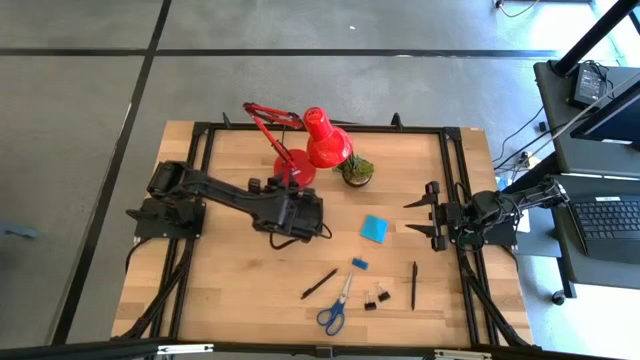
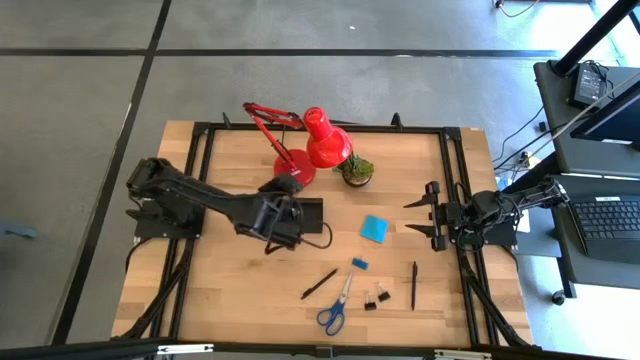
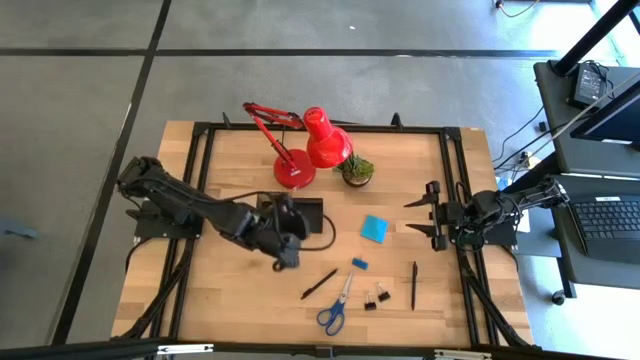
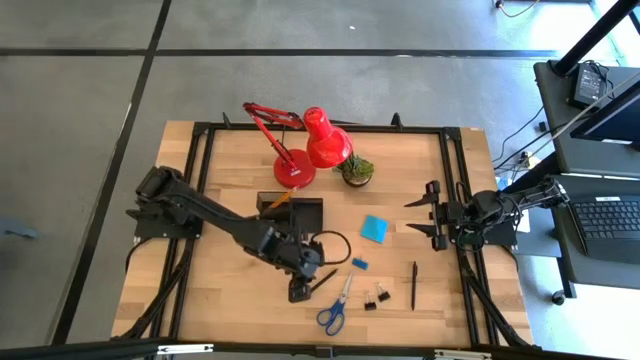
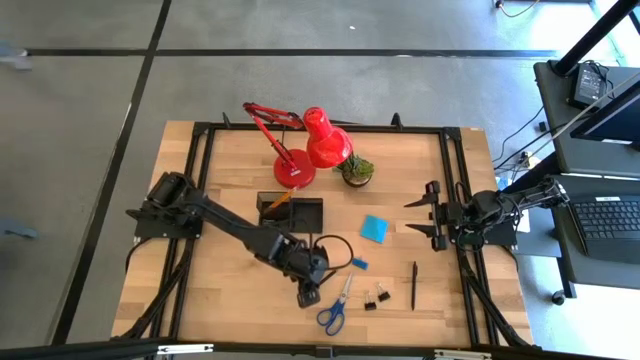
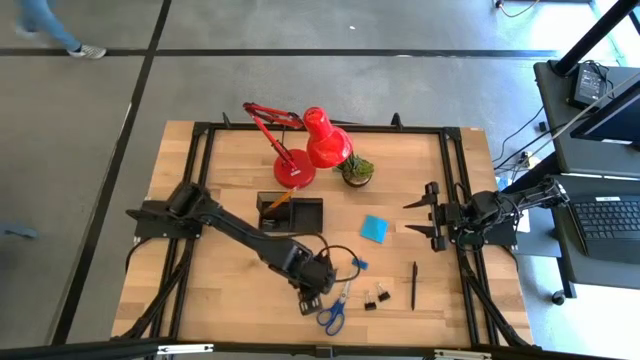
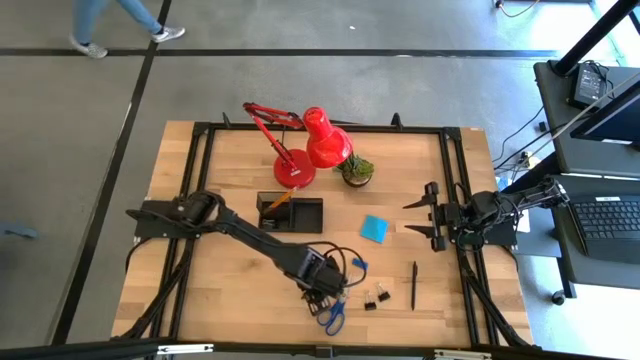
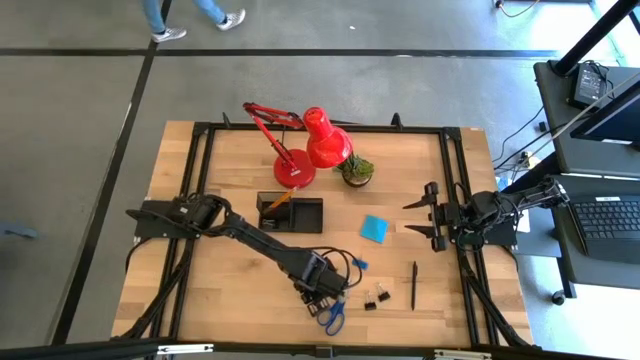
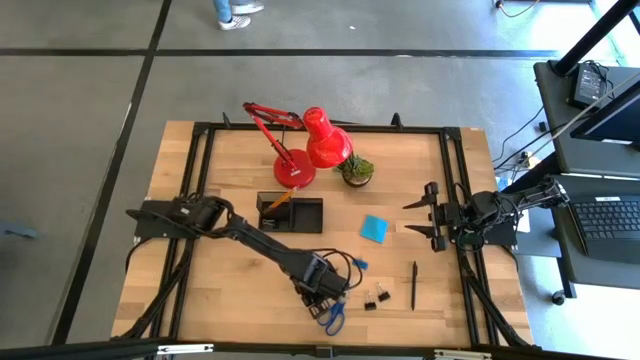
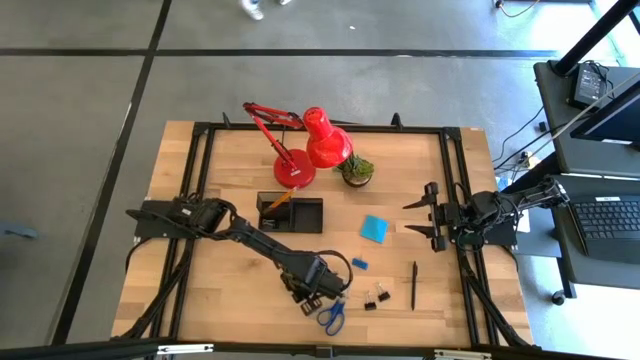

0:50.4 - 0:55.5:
Task: Pick and place office supplies into organizer
Put the left black pen into the black desk organizer

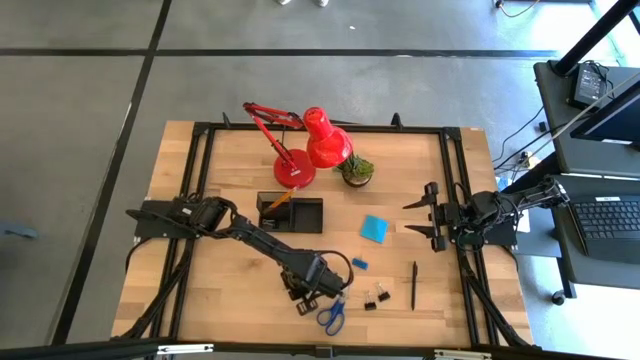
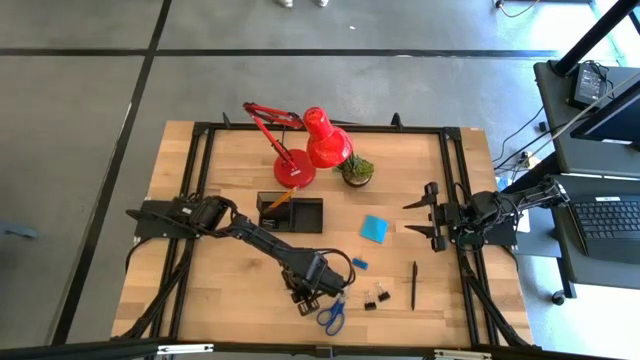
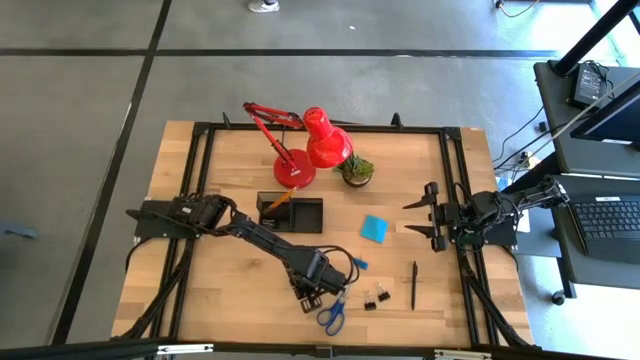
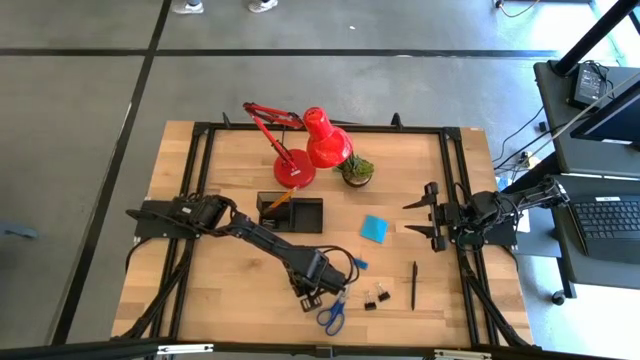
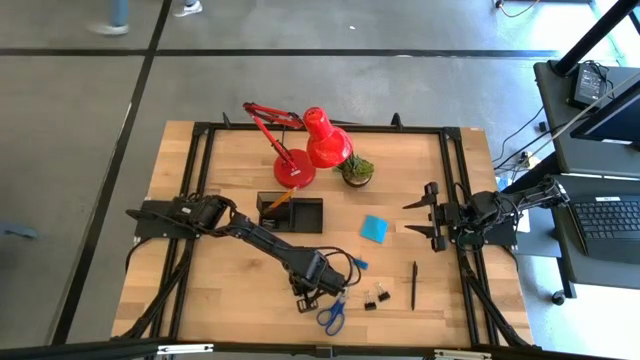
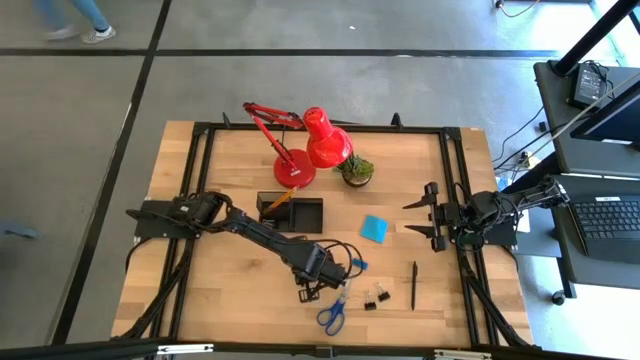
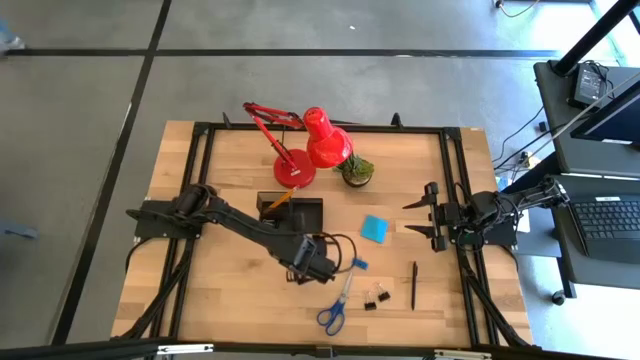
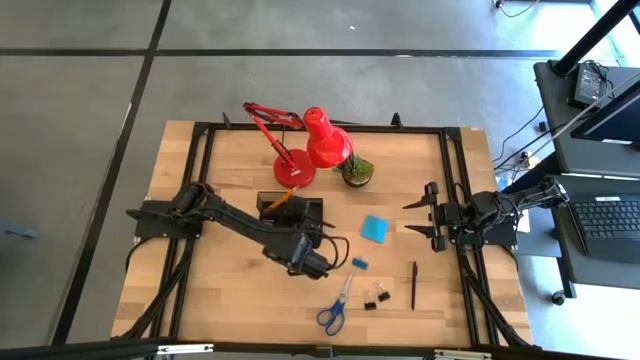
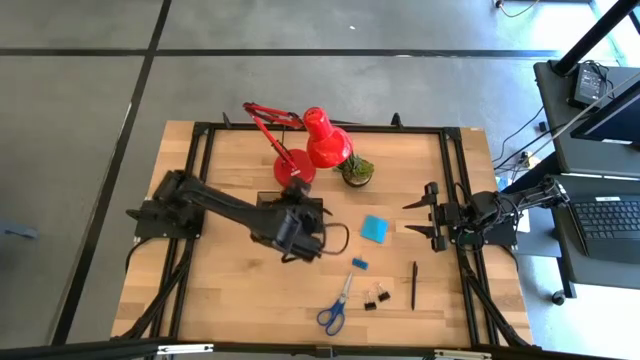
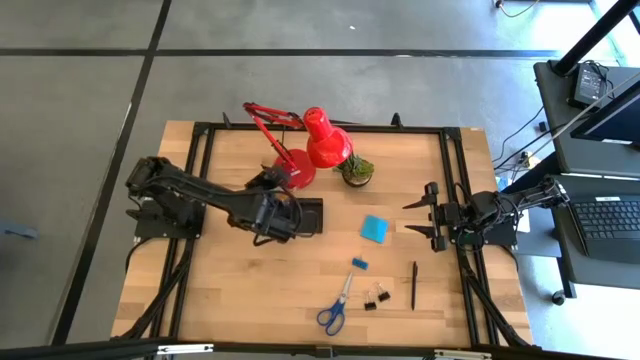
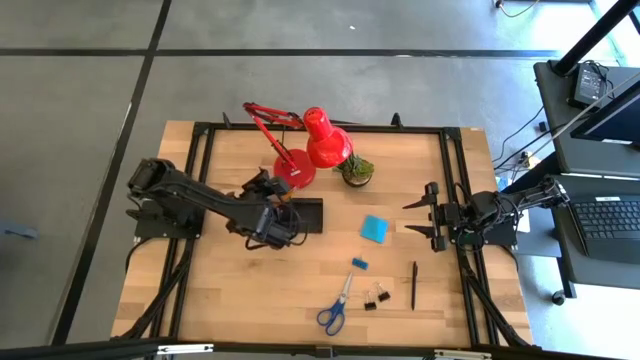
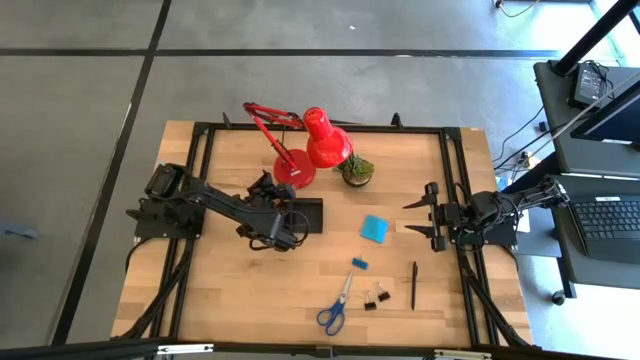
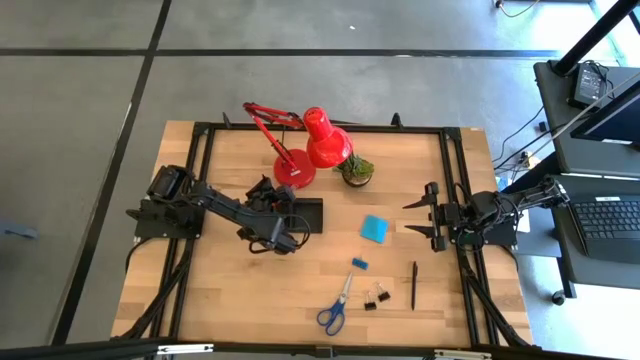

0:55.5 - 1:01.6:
Put the left black pen into the black desk organizer

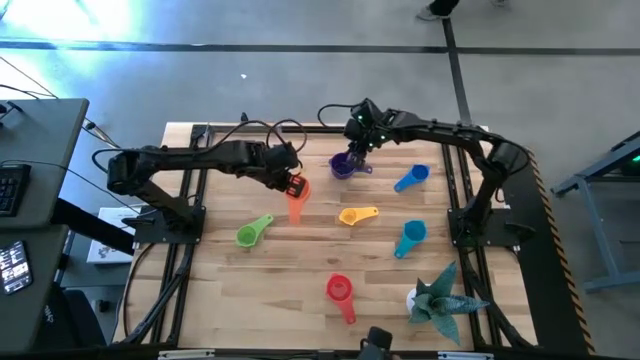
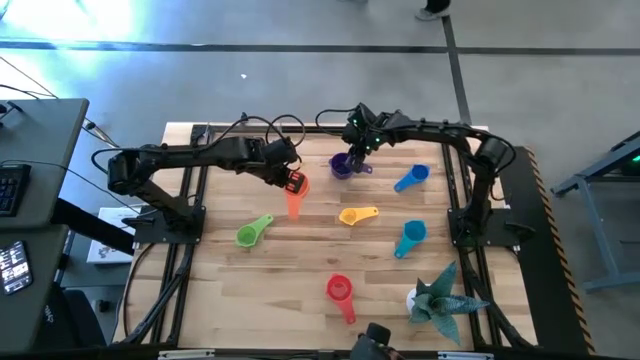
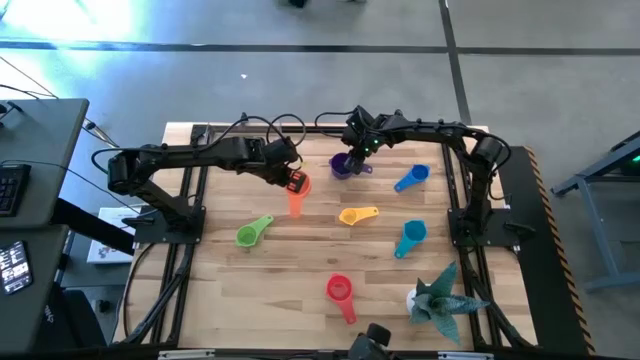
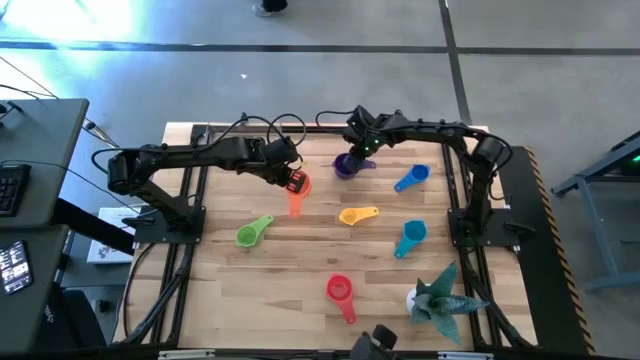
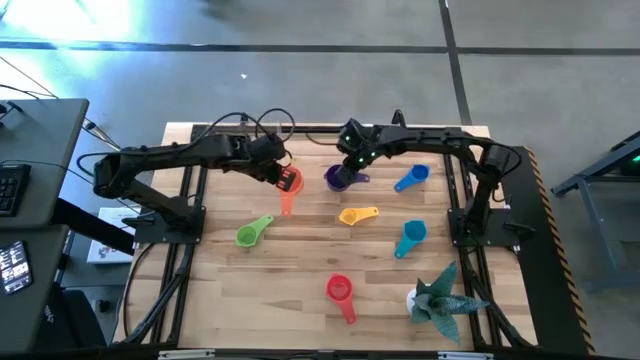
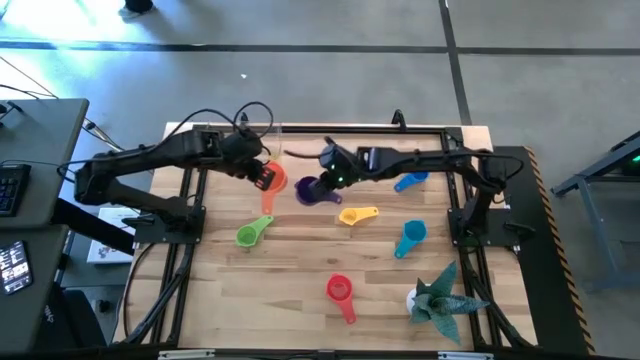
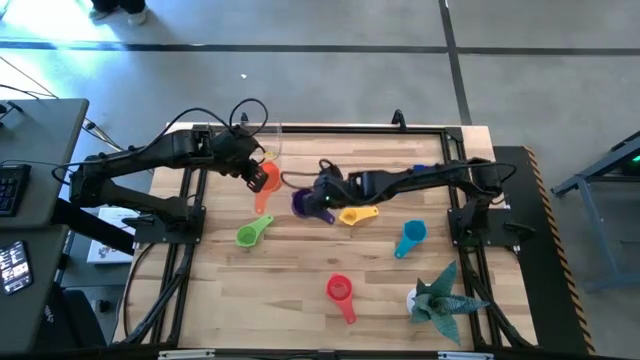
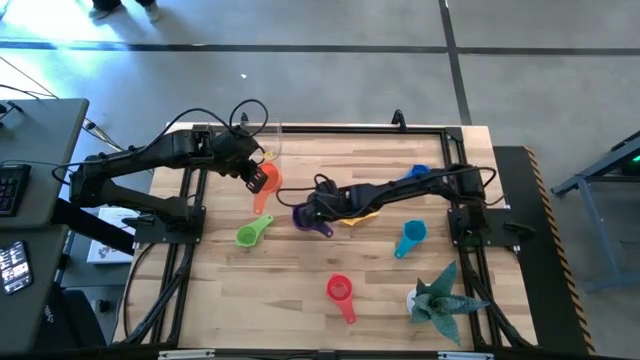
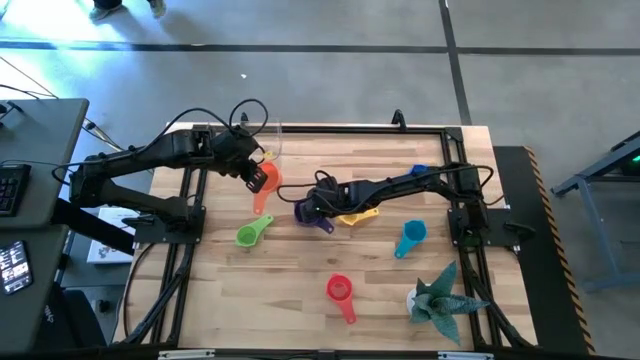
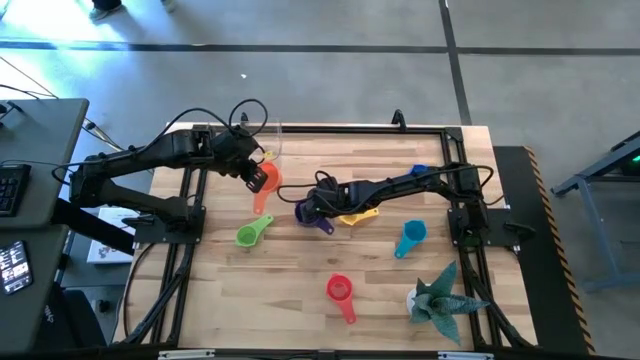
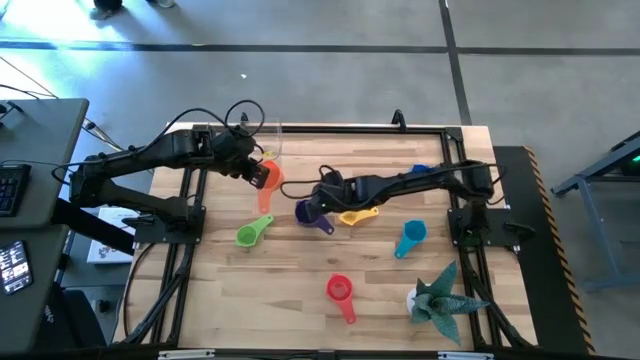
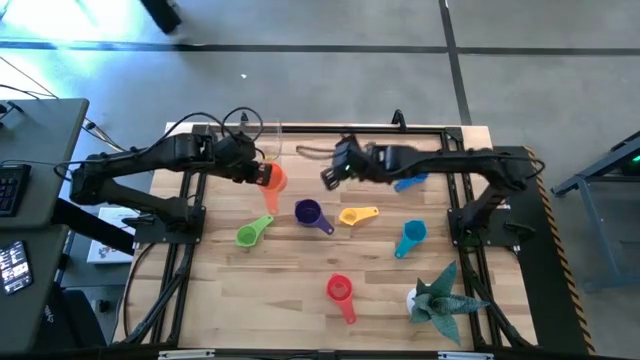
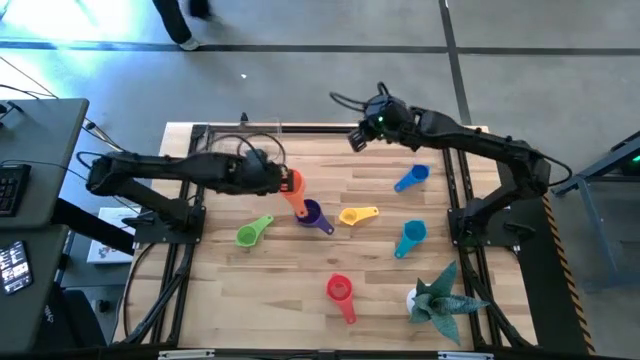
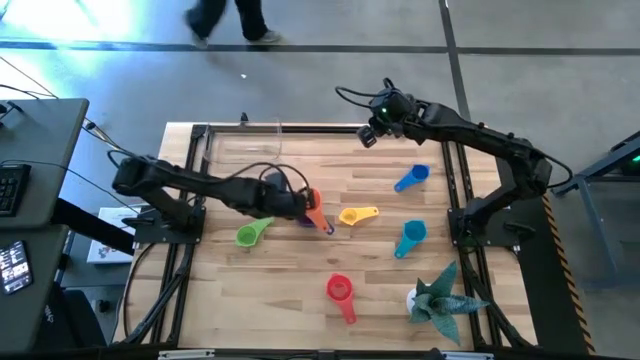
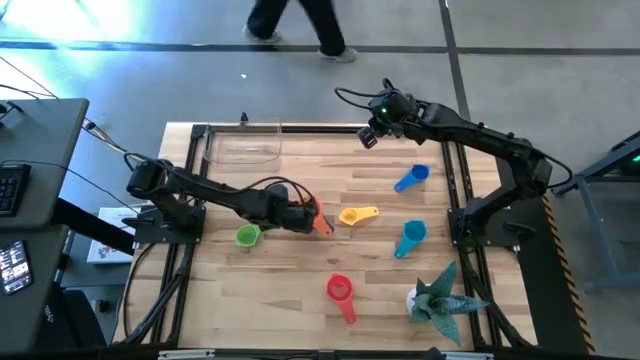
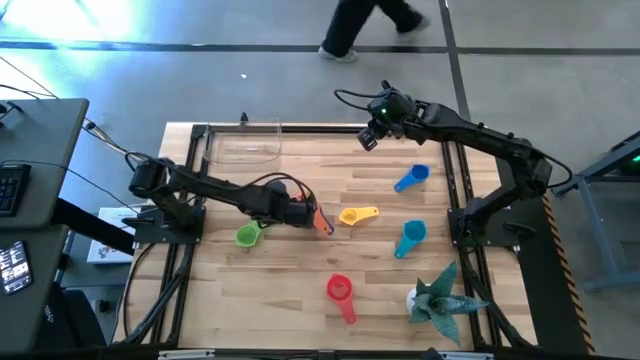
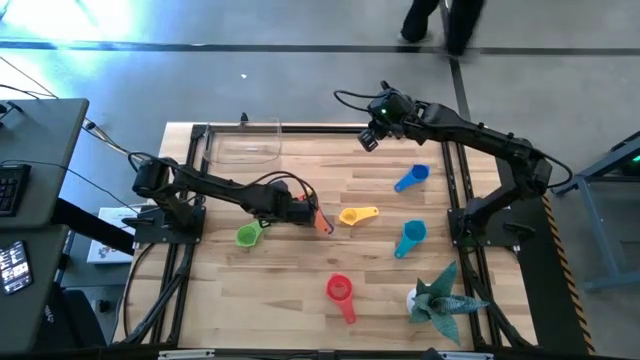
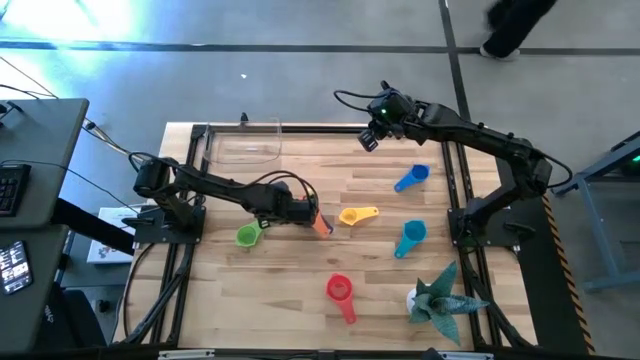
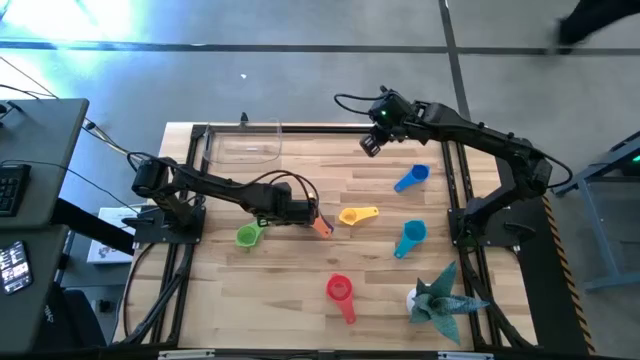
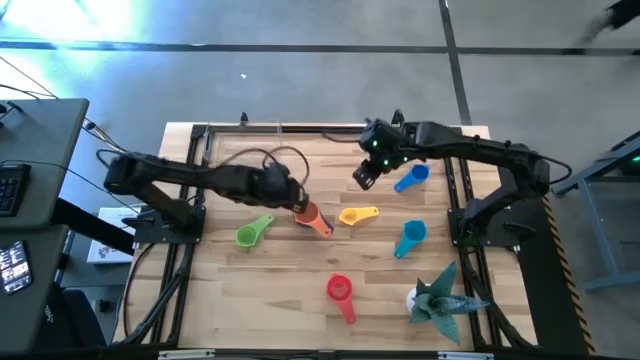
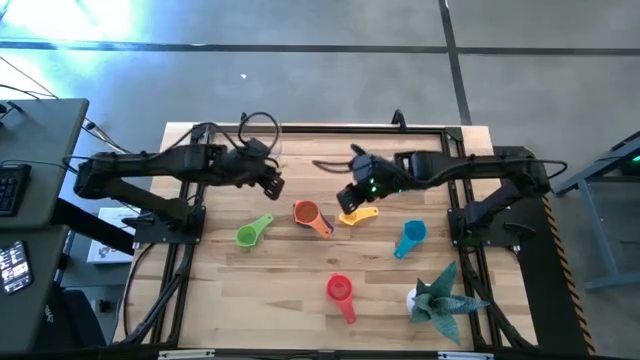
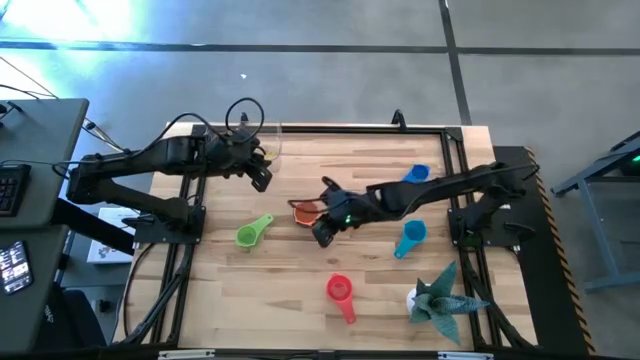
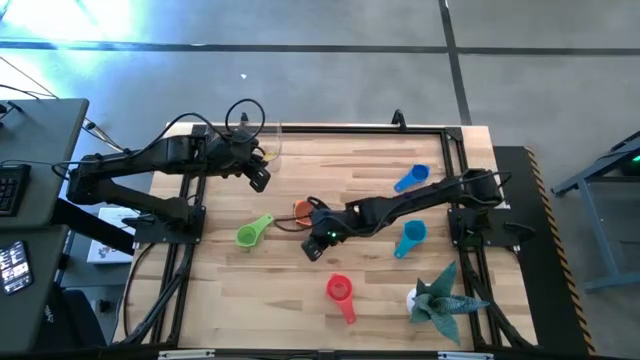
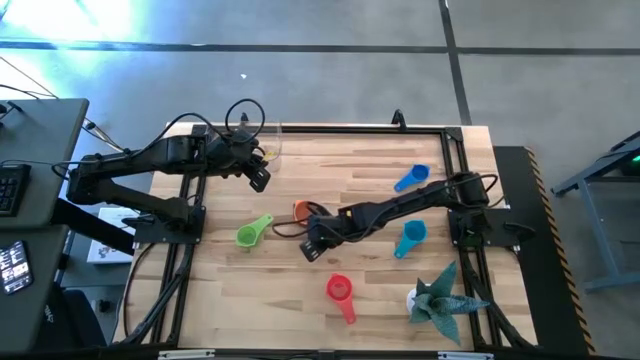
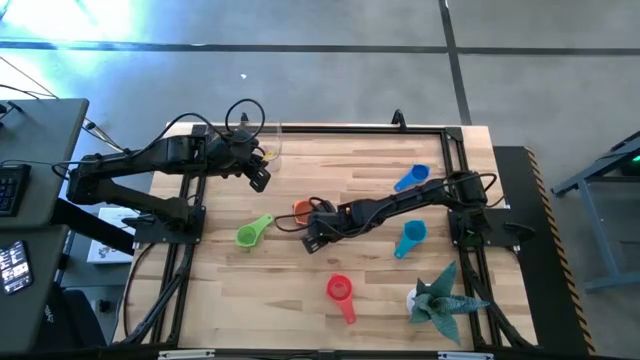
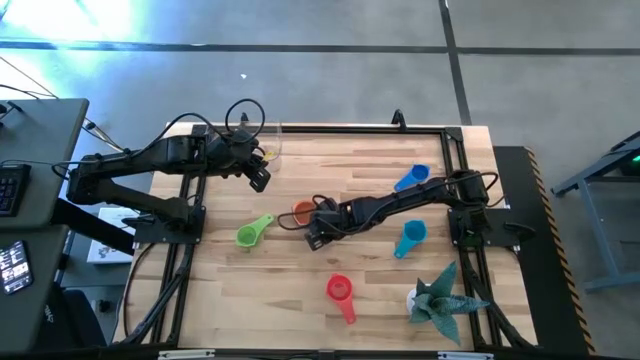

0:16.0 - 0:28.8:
Task: Nest measuring cups in basket
Stack the orange measuring cup on top of the violet measuring cup
